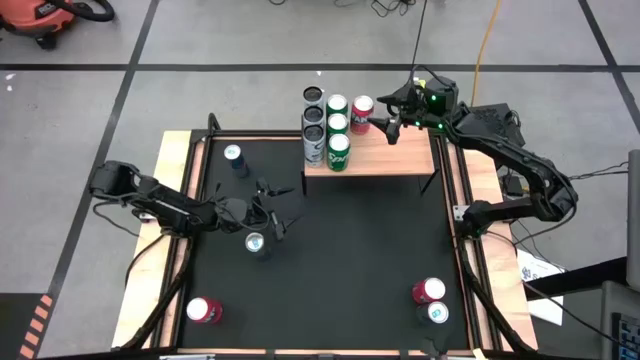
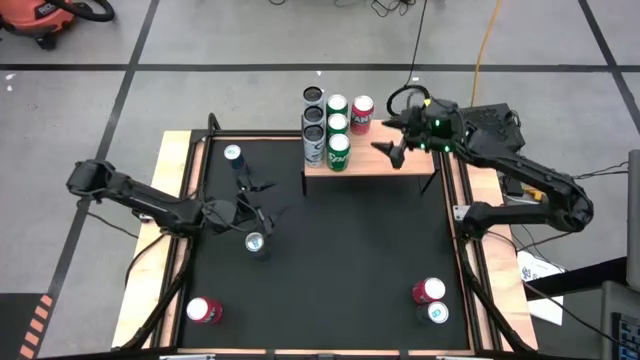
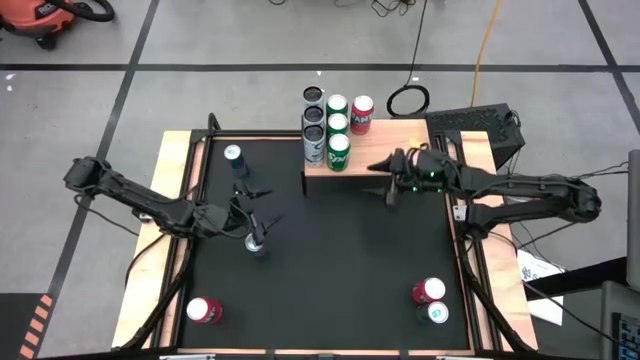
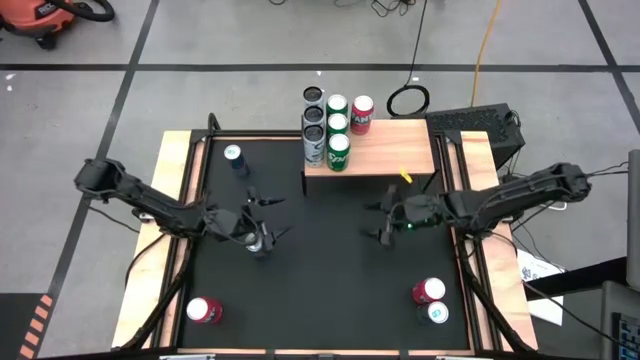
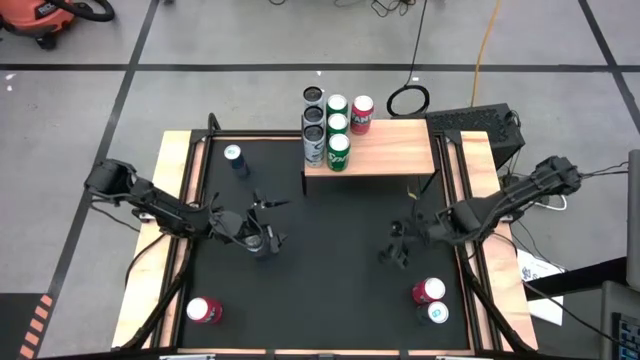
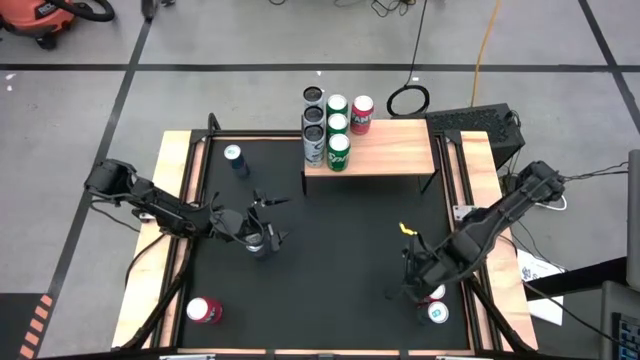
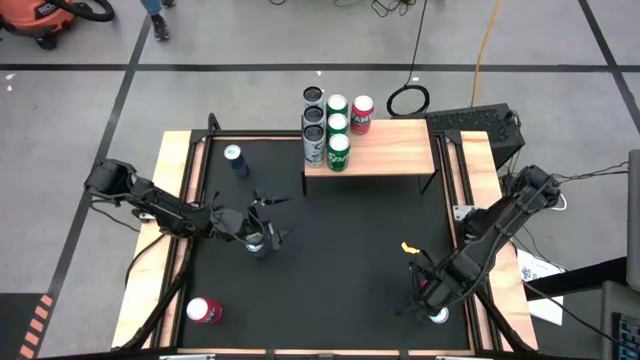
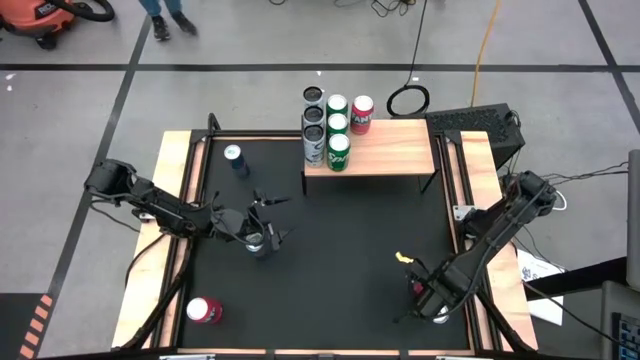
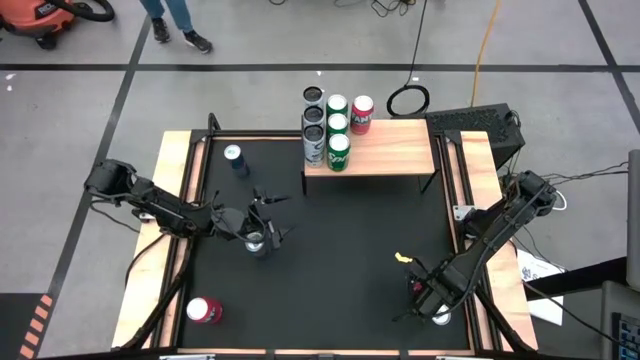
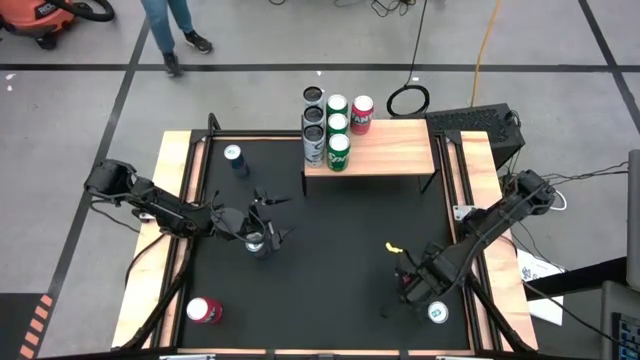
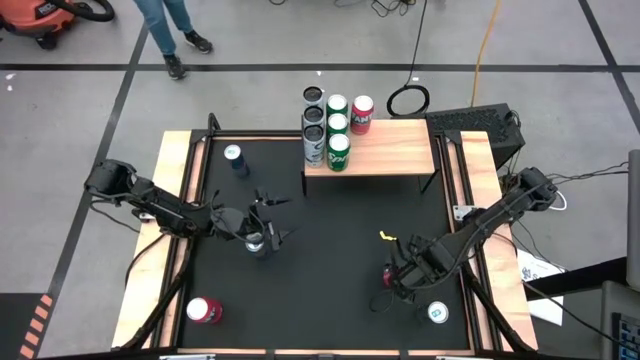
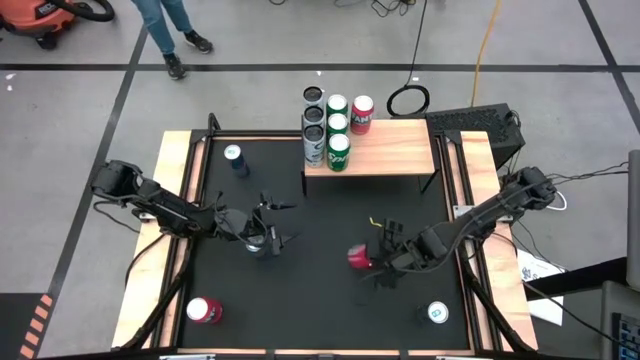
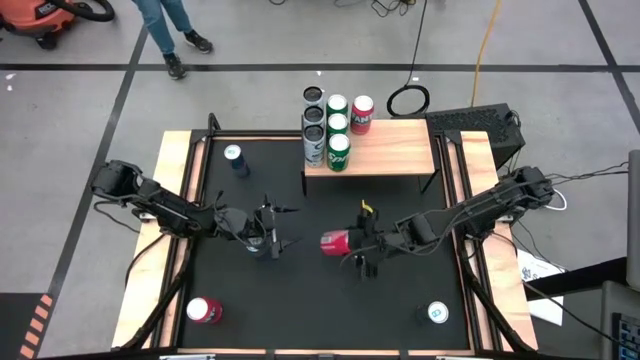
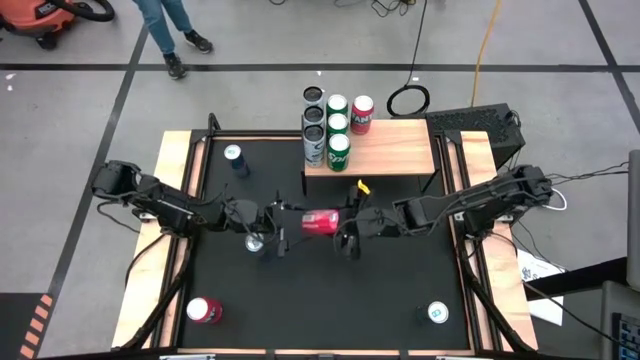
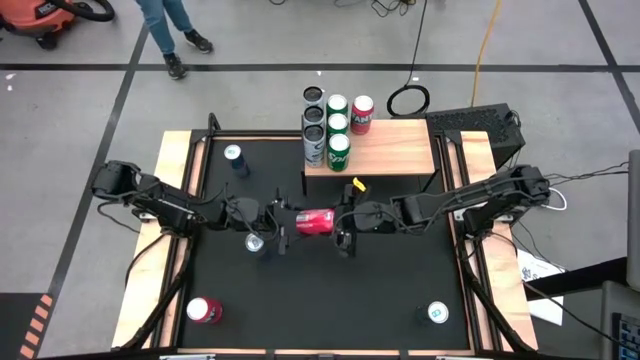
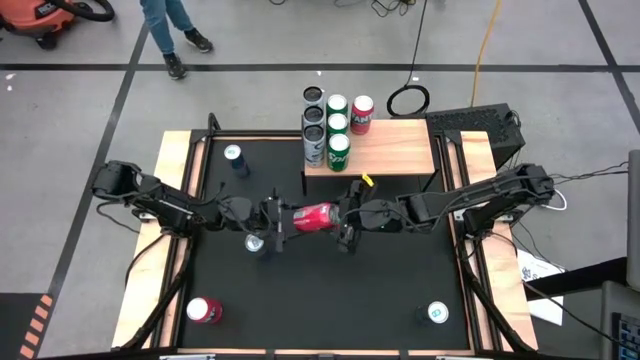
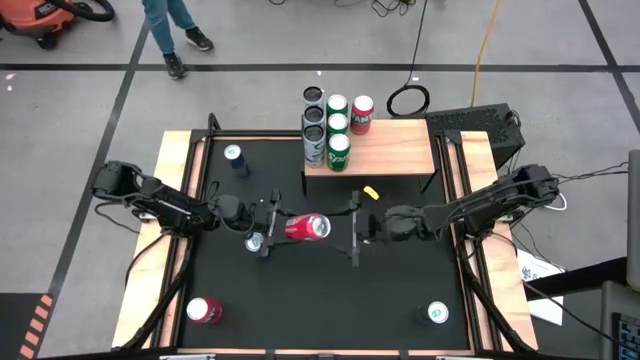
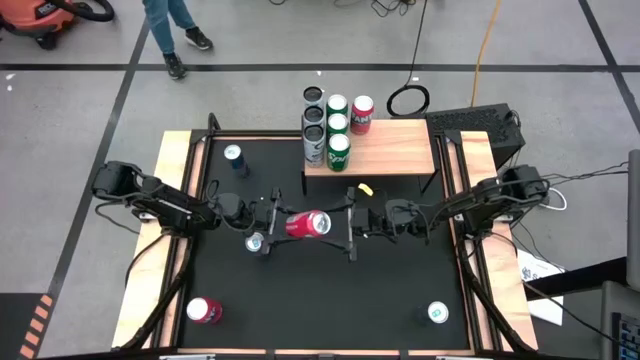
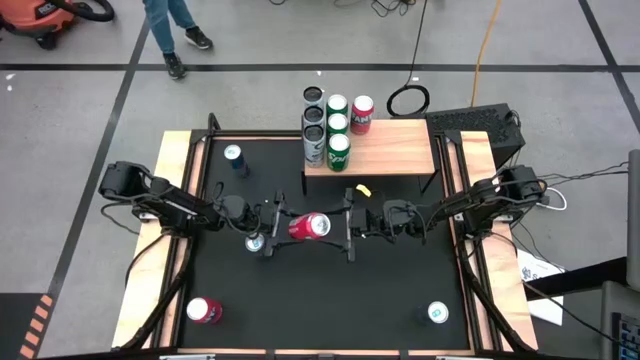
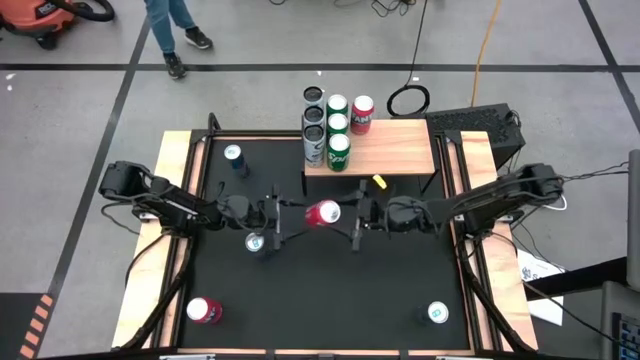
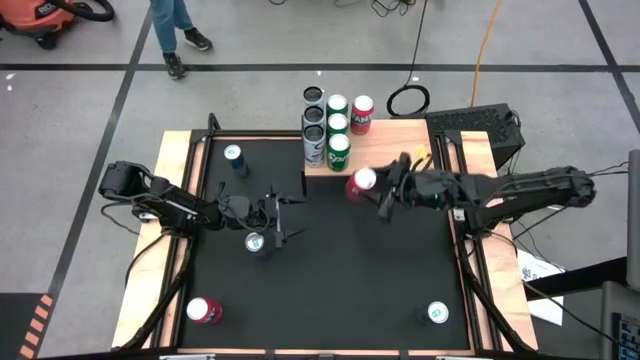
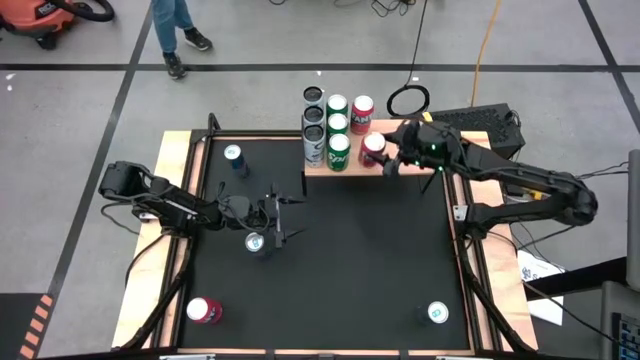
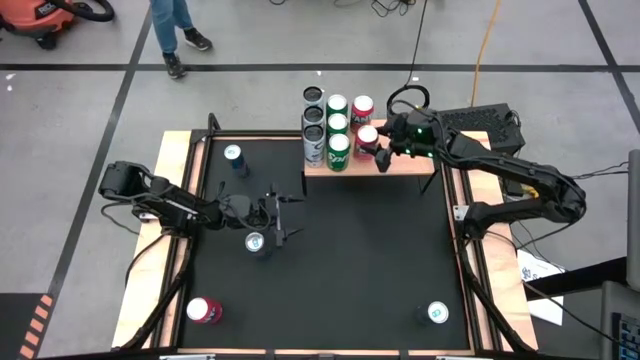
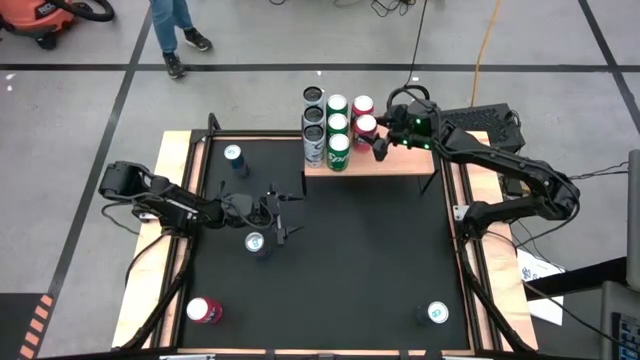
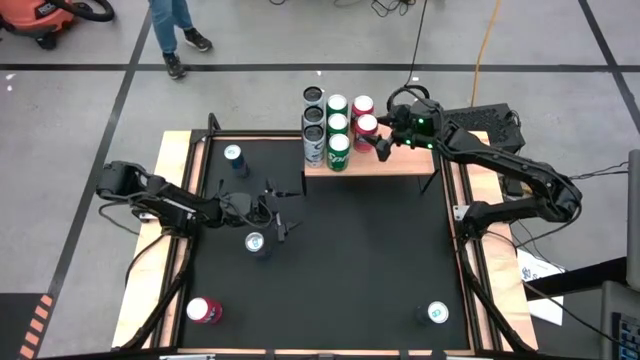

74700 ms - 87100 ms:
Task: Place canned beverage on shelf
Put the right red soda can on the shelf aligned with the other red soda can

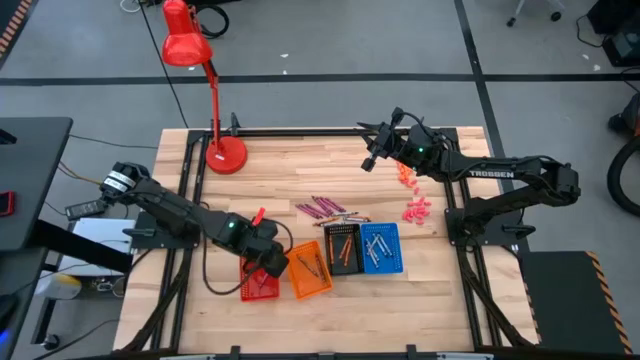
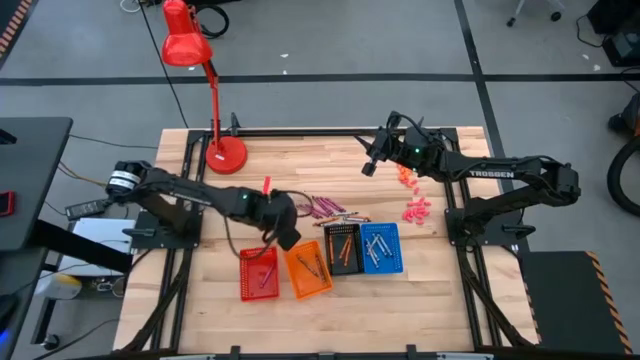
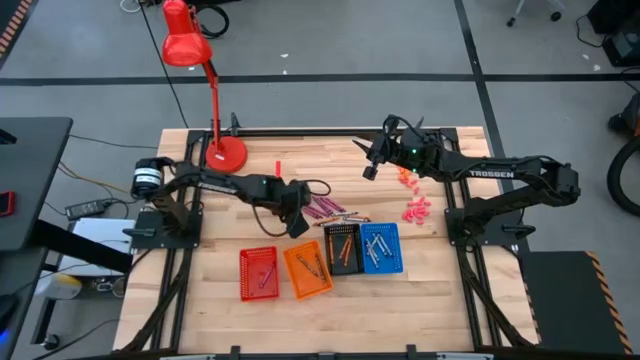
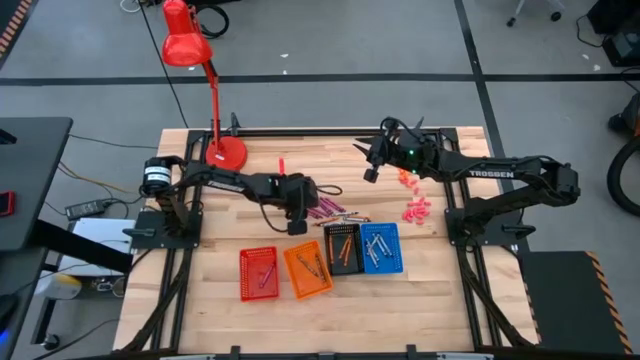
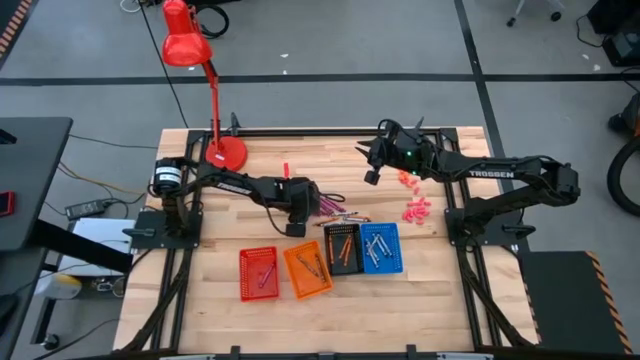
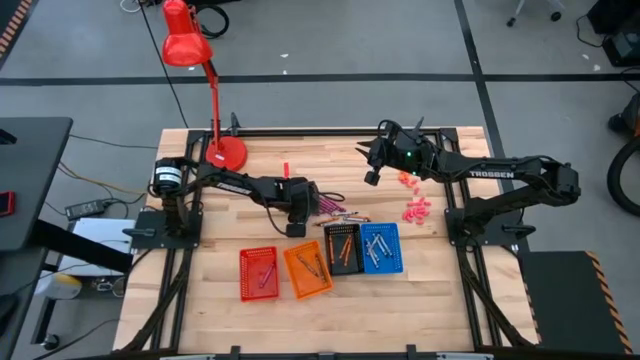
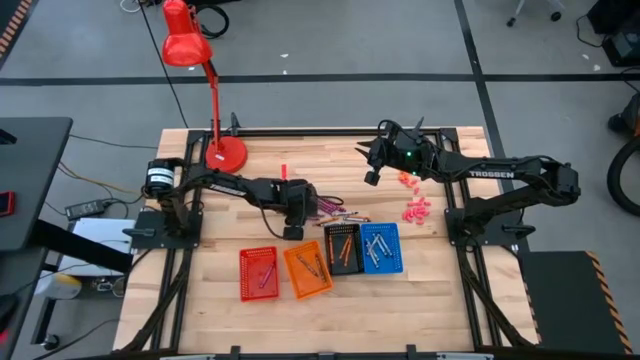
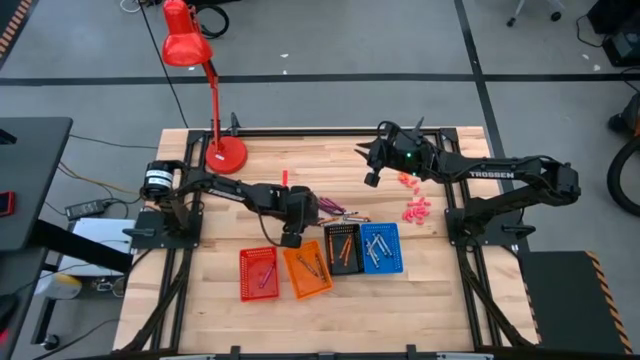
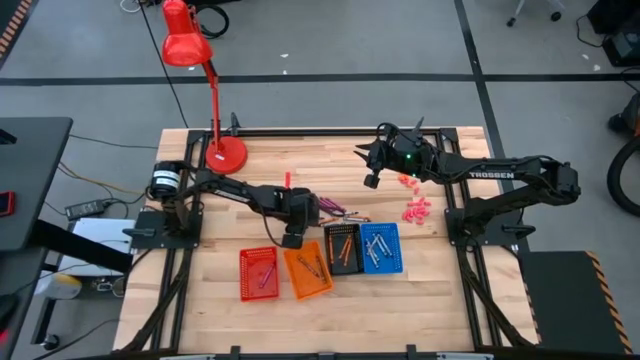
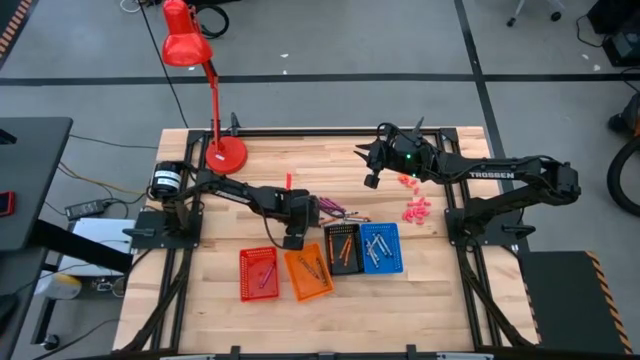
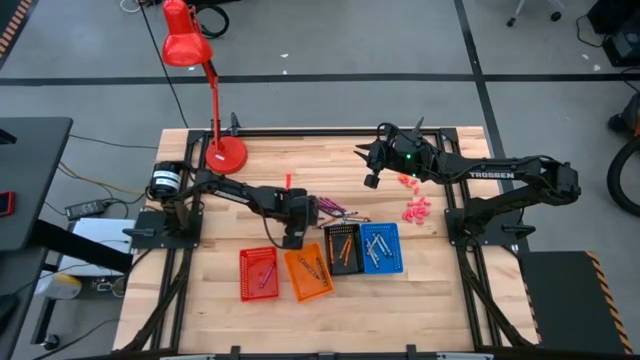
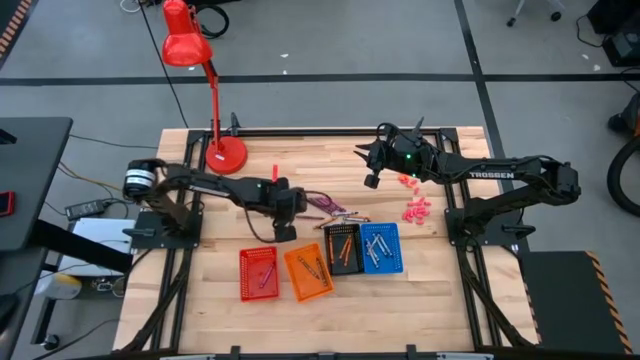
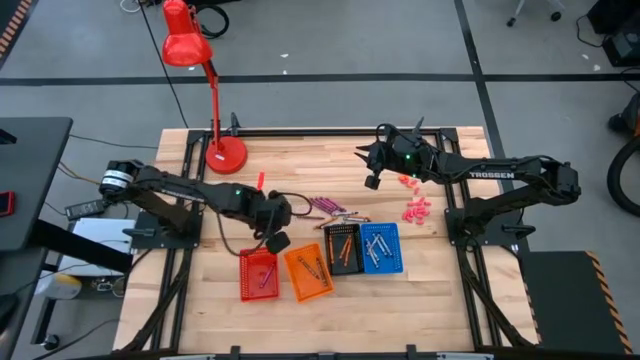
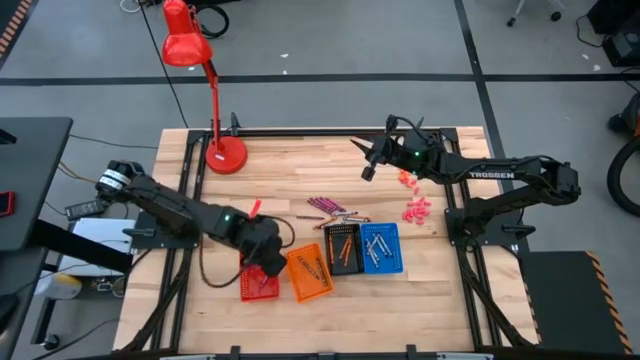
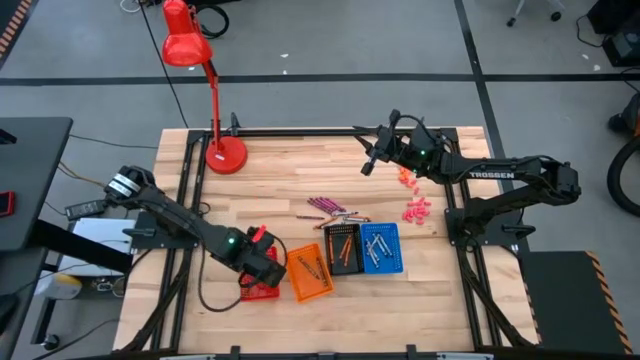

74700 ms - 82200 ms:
Task: Sort crayons
Put the pink crayon into the red bin
